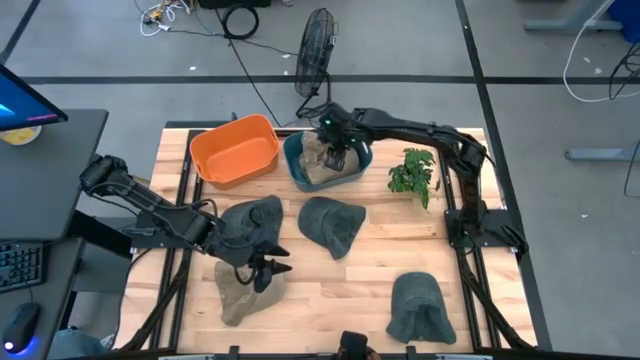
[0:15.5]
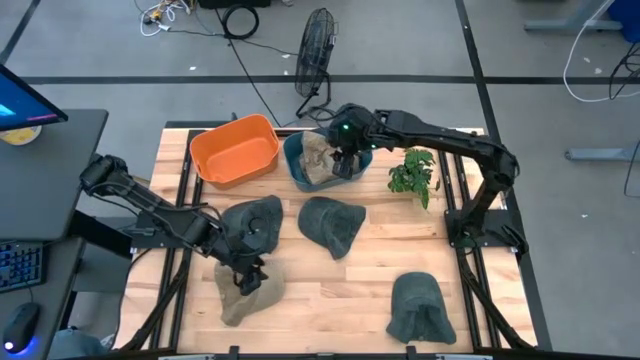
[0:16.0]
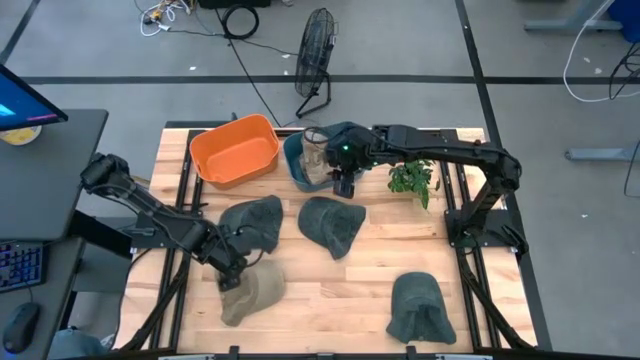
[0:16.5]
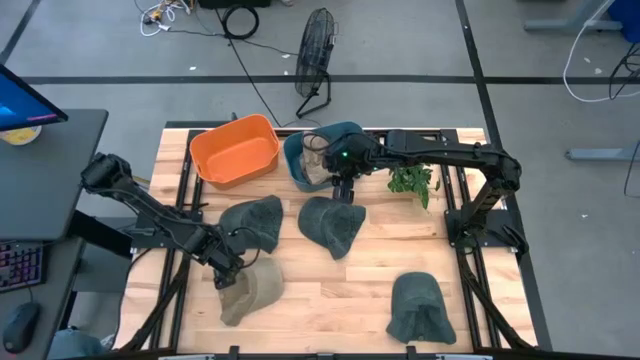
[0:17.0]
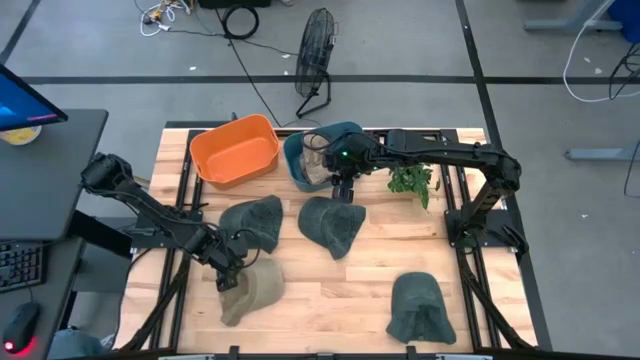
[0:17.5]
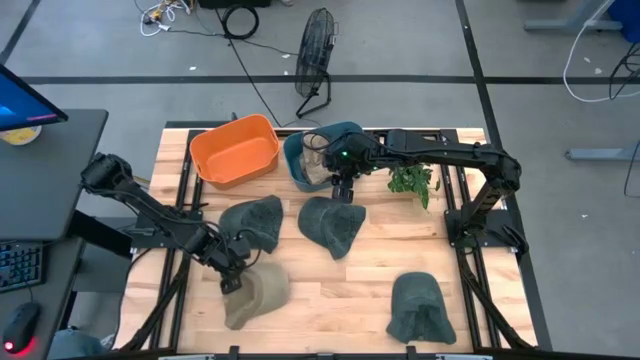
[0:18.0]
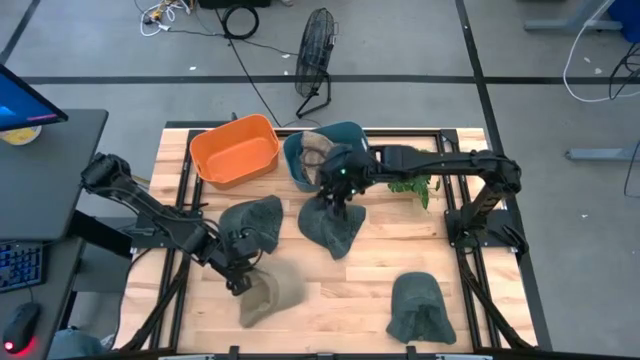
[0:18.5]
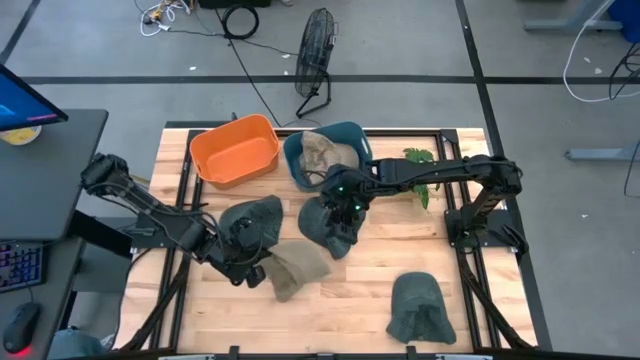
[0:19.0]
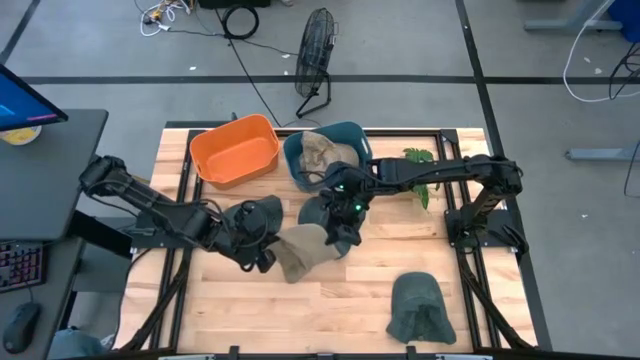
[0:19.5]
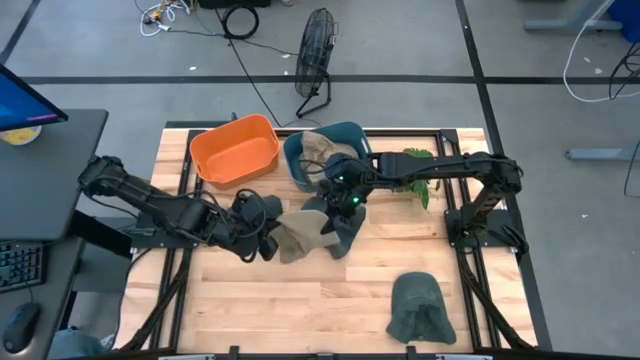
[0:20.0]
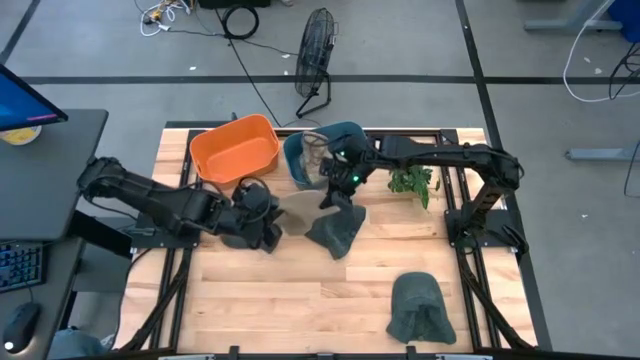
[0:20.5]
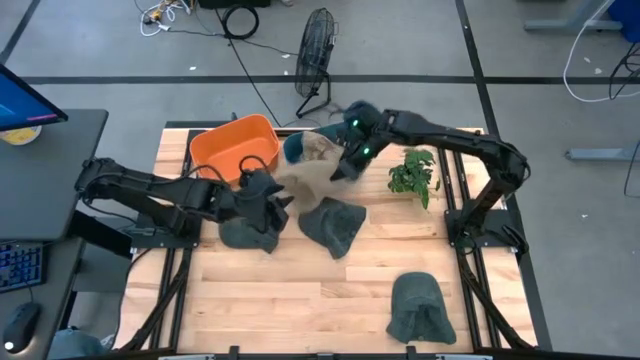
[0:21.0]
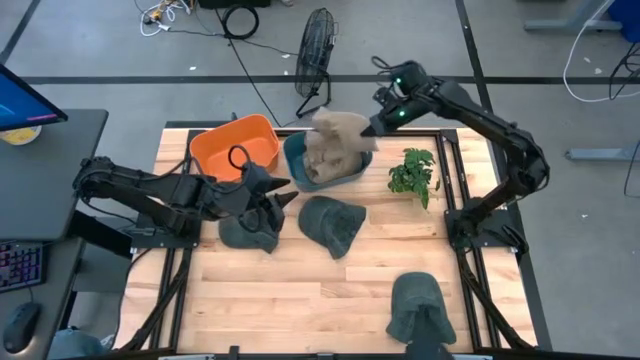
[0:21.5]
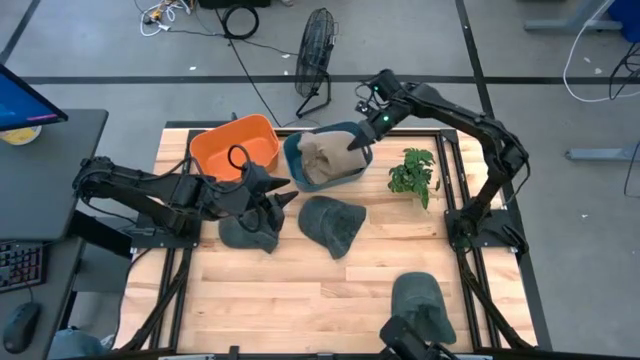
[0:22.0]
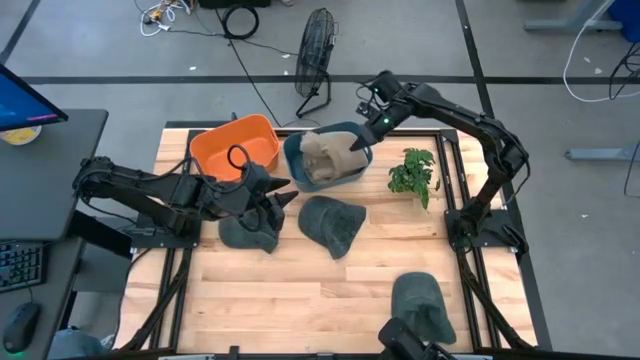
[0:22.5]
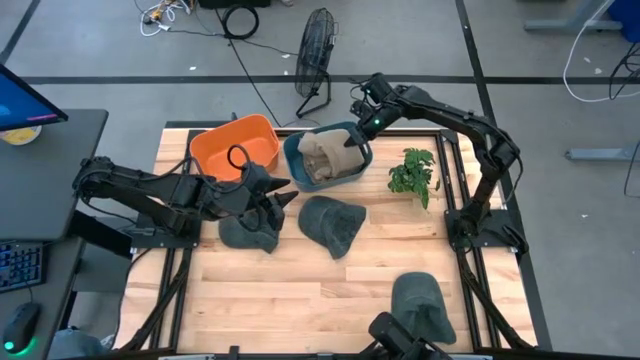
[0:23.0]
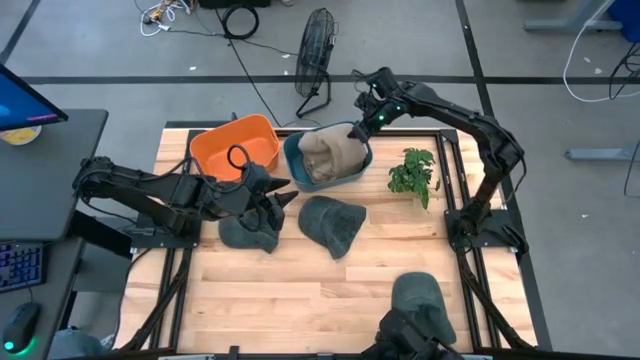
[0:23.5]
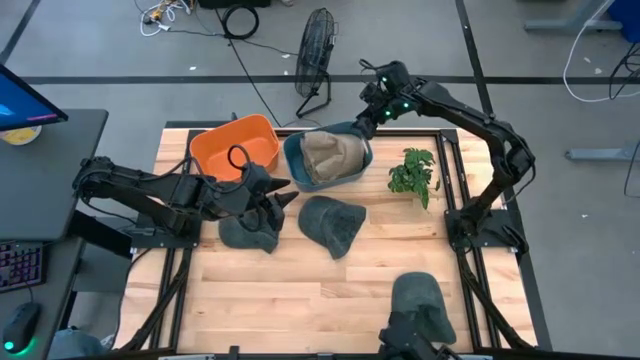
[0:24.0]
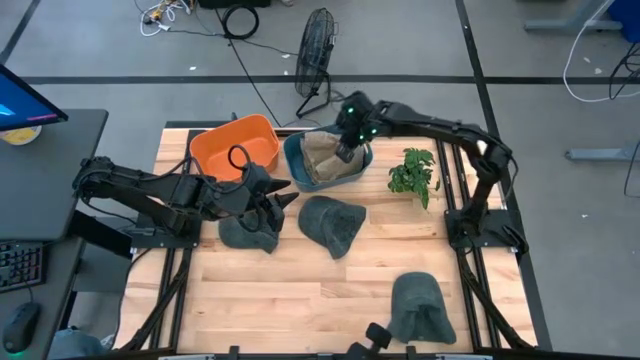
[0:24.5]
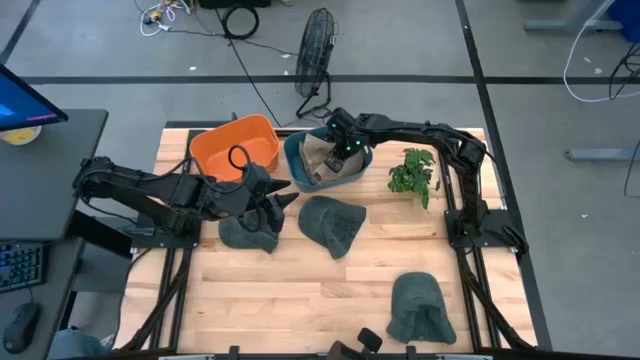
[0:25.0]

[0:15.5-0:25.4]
Task: Pick & Place hat
Put the brown cap into the blue bin

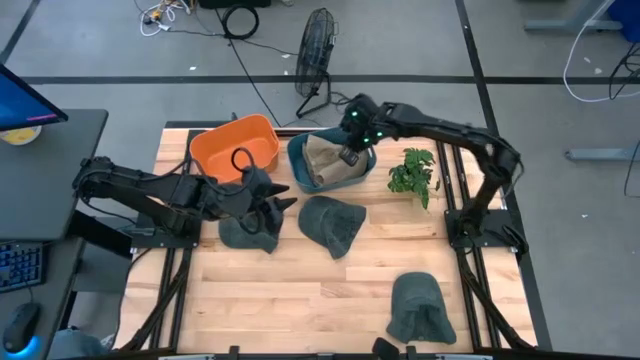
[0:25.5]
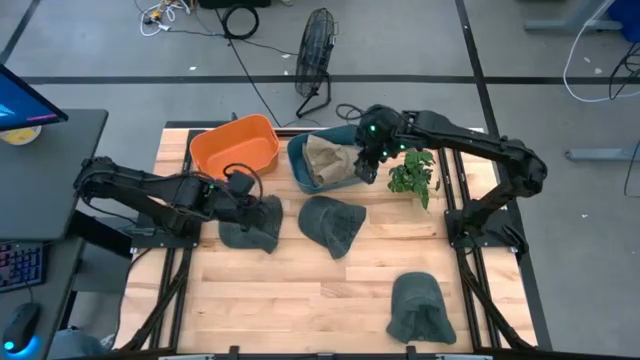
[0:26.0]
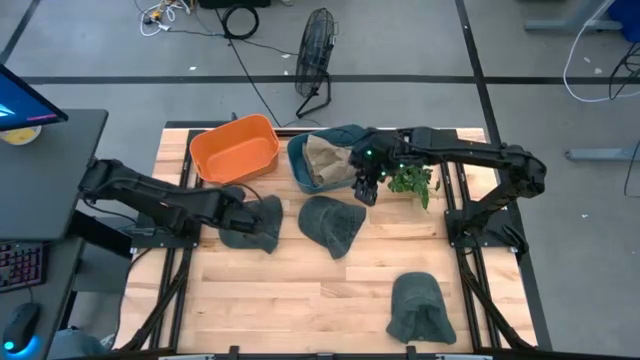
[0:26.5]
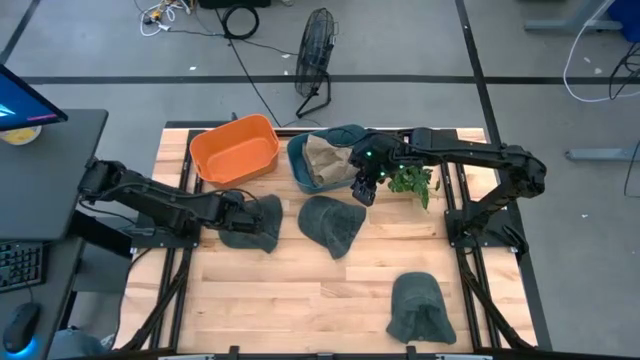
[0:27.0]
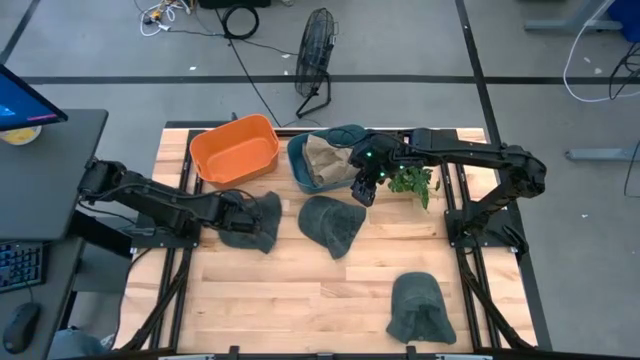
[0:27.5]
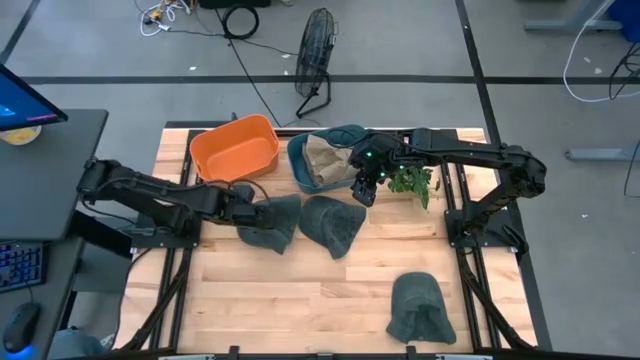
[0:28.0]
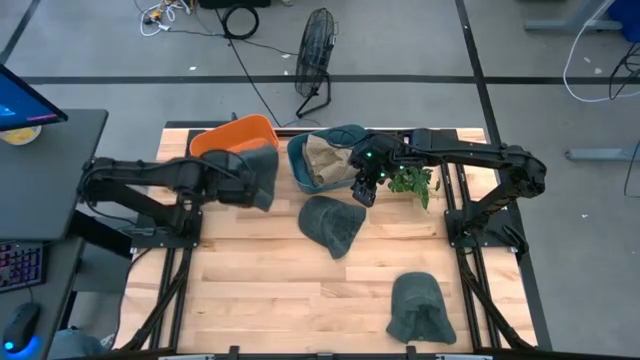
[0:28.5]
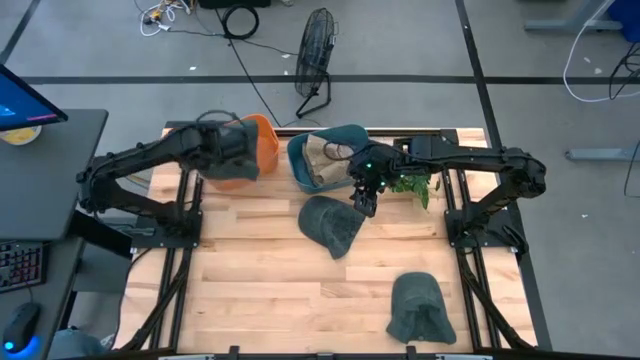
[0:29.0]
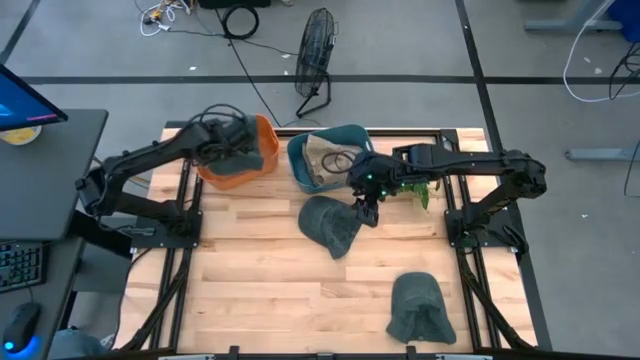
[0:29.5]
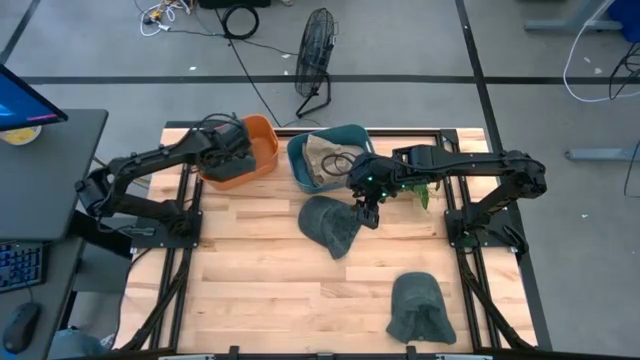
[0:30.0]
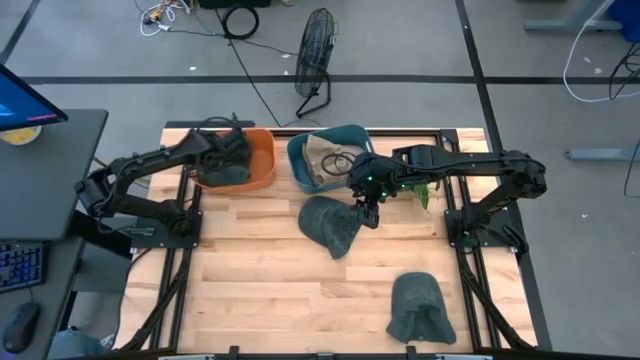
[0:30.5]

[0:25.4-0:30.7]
Put the top left gray cap into the orange bin

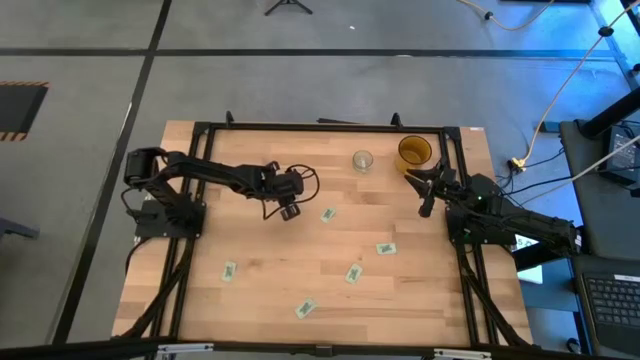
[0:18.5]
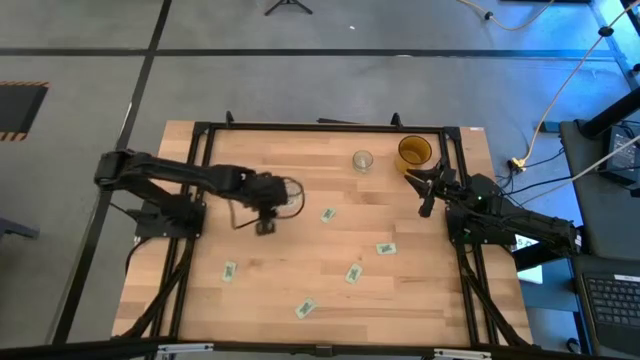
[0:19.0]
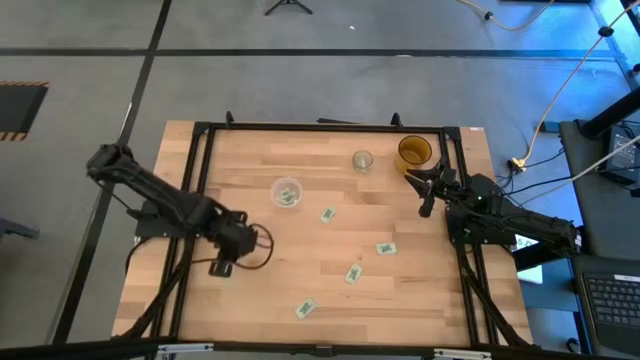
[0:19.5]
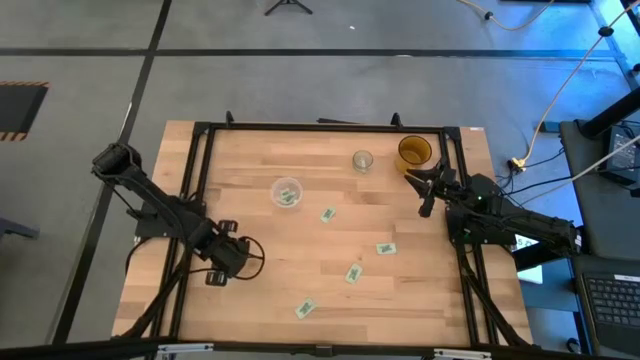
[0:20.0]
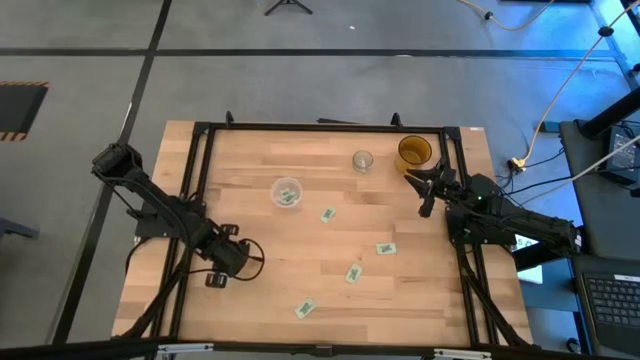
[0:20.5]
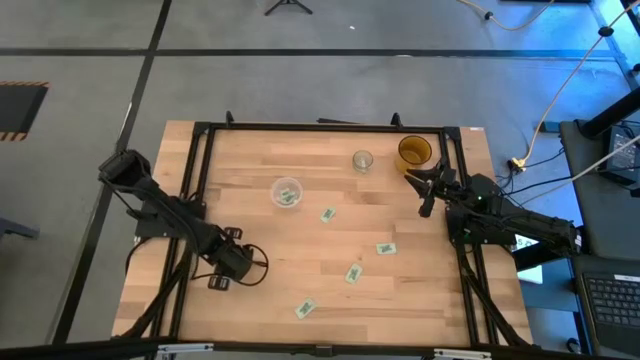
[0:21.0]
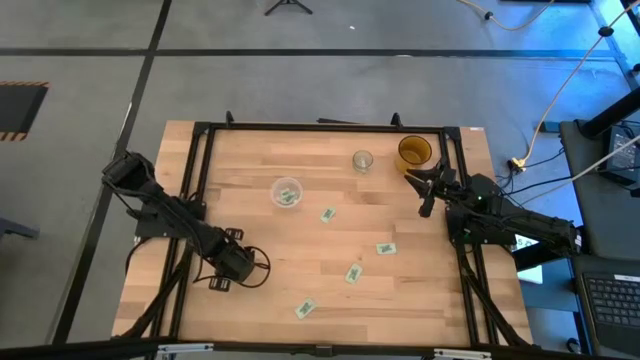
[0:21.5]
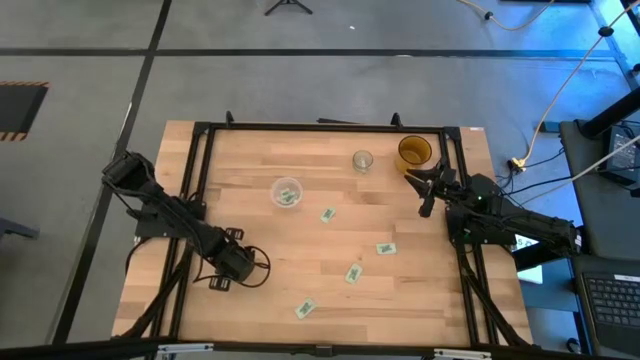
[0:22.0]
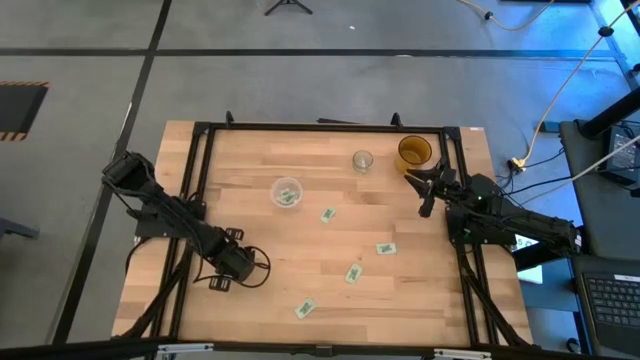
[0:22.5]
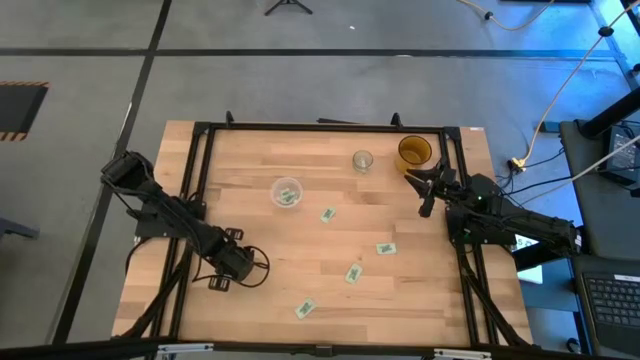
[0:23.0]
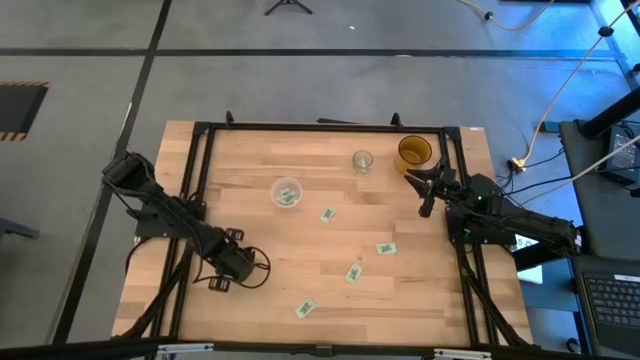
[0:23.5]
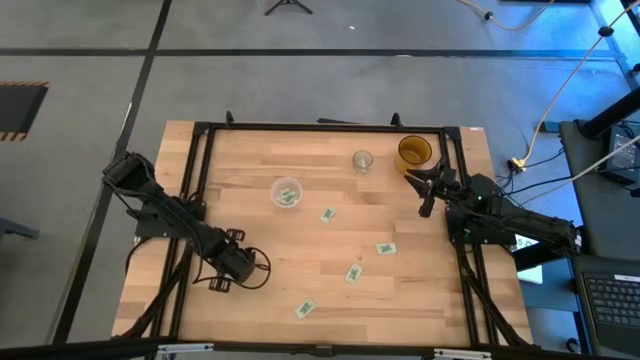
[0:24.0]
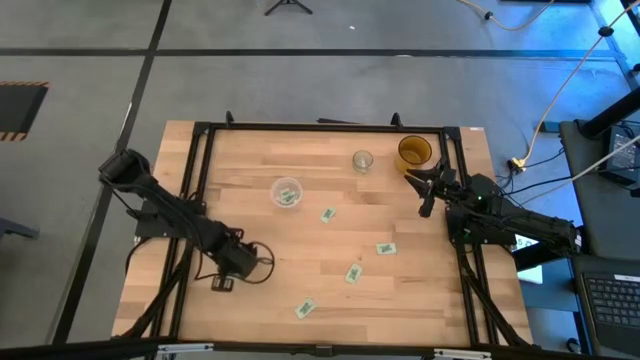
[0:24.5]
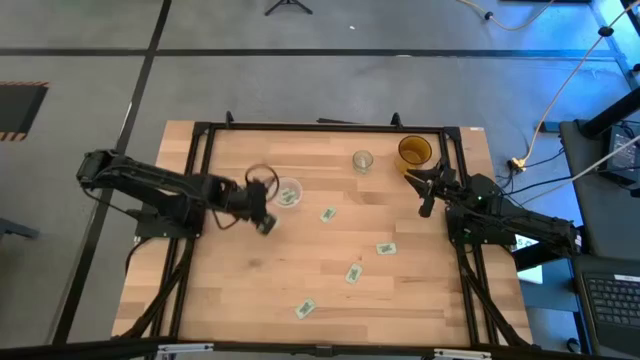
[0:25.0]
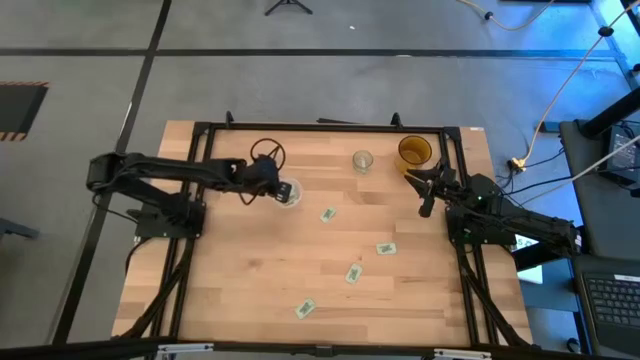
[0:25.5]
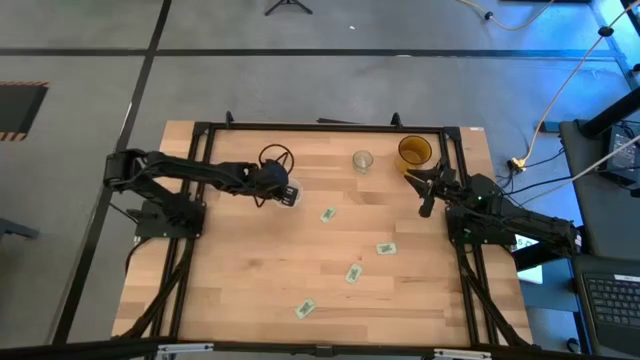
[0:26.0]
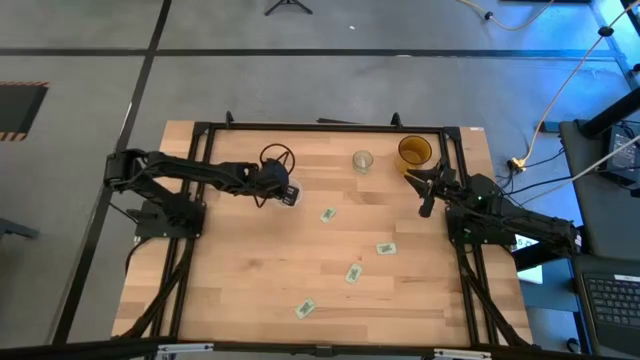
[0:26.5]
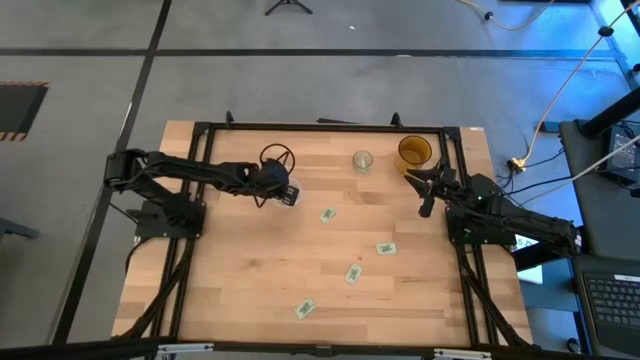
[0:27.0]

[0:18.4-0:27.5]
Task: Pick and place Stevia / Truvia into bins
Put the stevia packet into the transparent container
